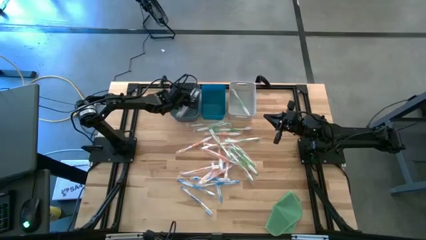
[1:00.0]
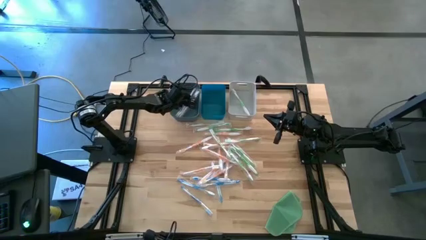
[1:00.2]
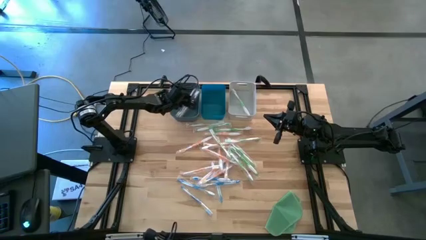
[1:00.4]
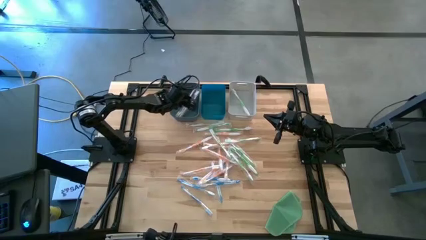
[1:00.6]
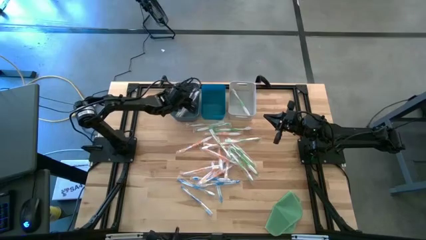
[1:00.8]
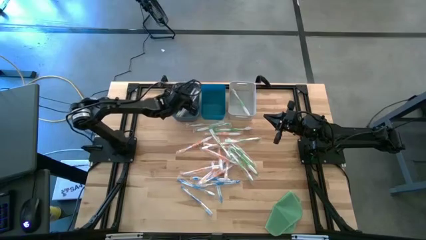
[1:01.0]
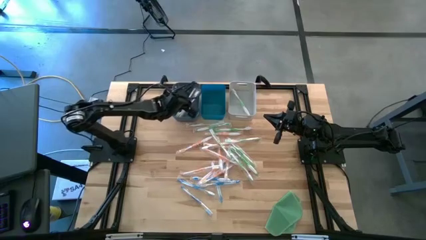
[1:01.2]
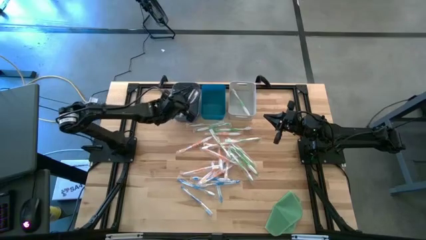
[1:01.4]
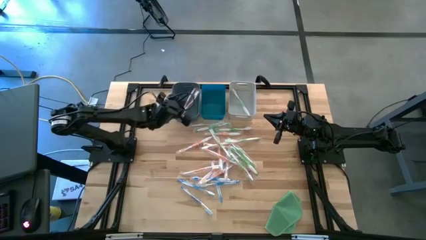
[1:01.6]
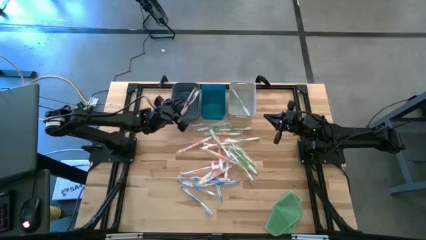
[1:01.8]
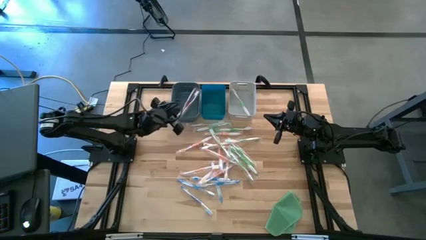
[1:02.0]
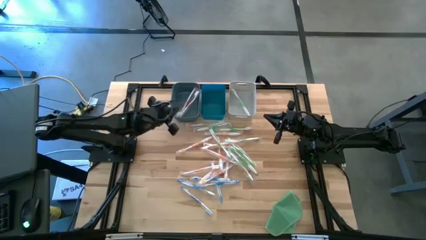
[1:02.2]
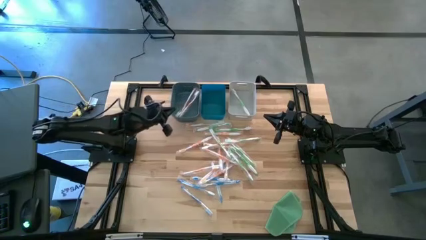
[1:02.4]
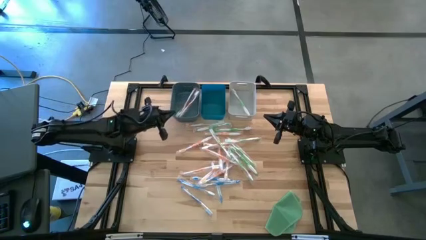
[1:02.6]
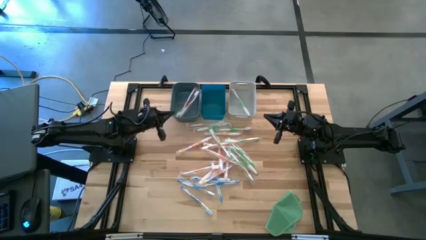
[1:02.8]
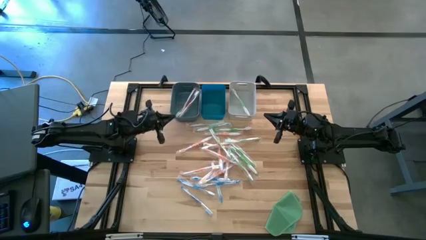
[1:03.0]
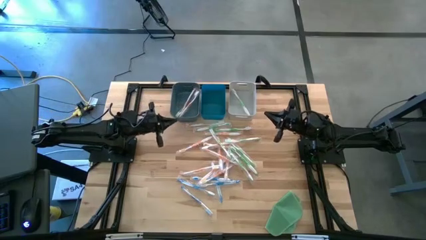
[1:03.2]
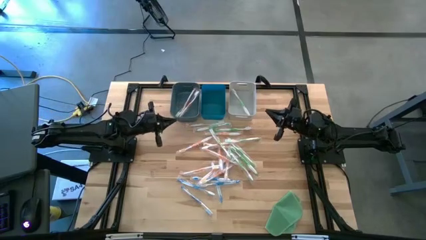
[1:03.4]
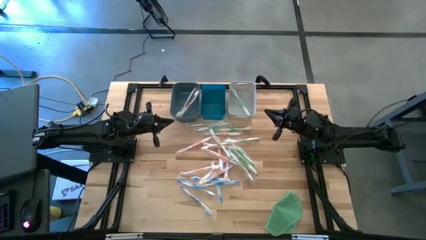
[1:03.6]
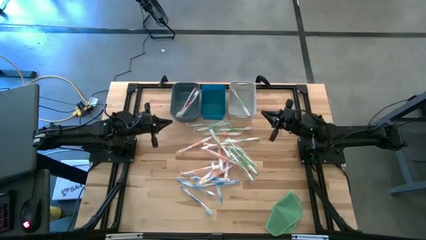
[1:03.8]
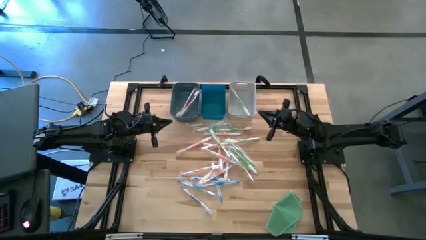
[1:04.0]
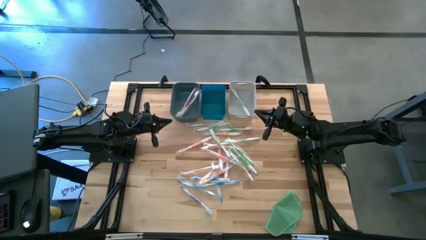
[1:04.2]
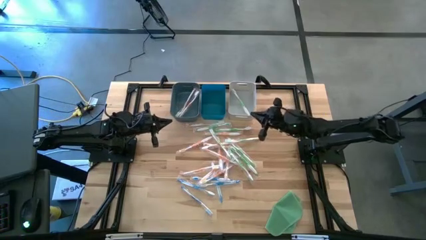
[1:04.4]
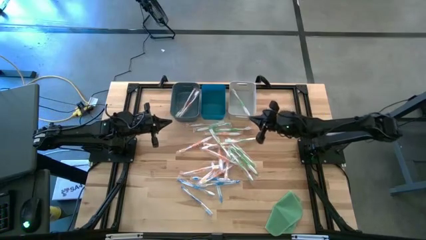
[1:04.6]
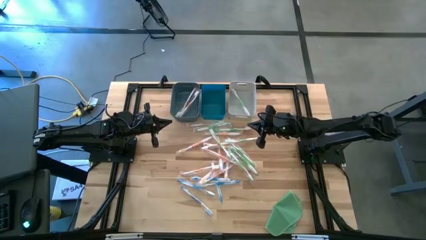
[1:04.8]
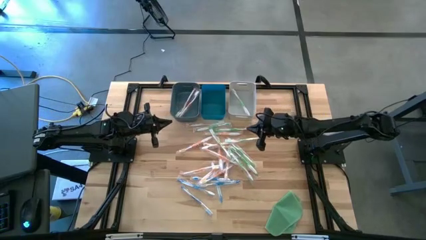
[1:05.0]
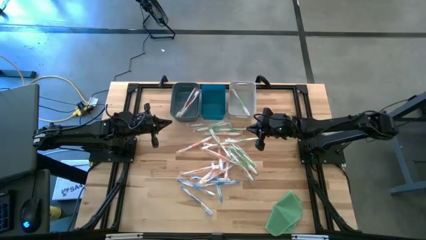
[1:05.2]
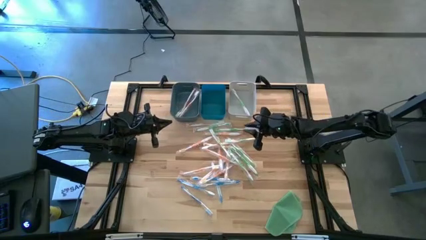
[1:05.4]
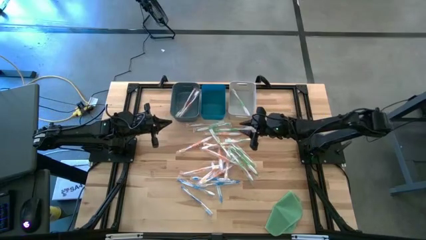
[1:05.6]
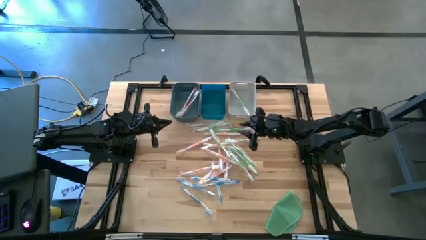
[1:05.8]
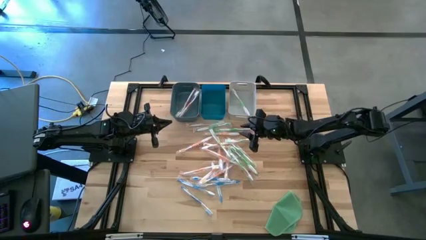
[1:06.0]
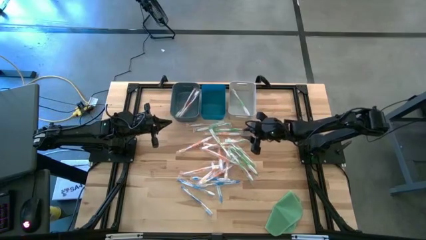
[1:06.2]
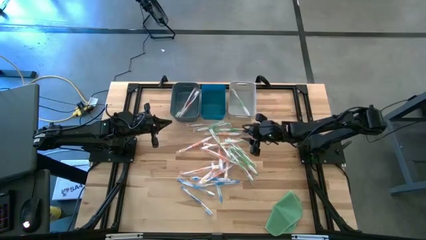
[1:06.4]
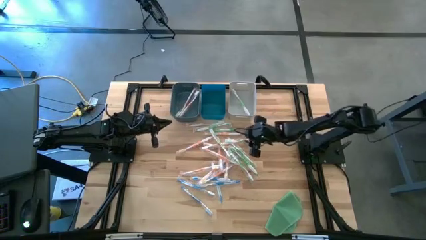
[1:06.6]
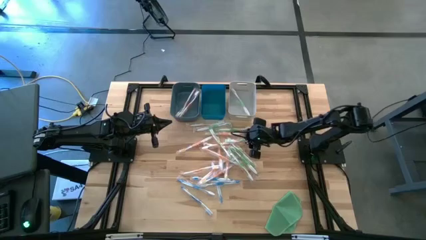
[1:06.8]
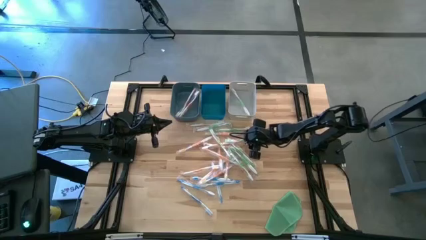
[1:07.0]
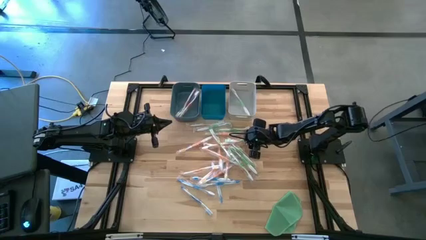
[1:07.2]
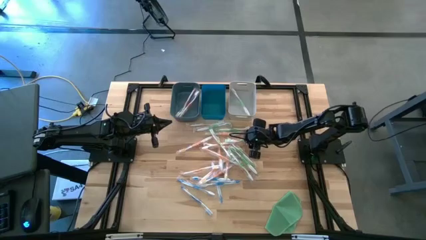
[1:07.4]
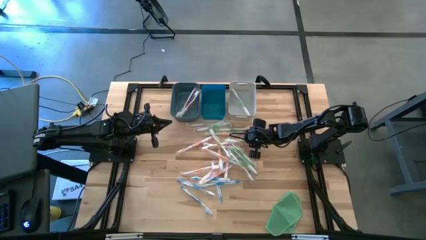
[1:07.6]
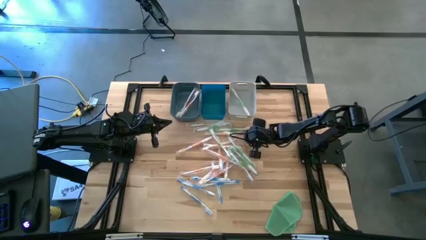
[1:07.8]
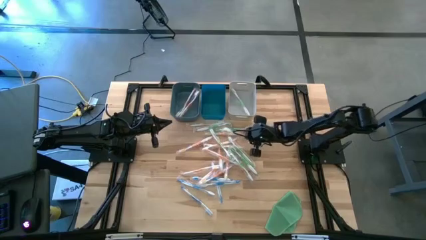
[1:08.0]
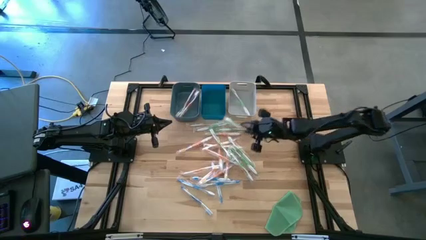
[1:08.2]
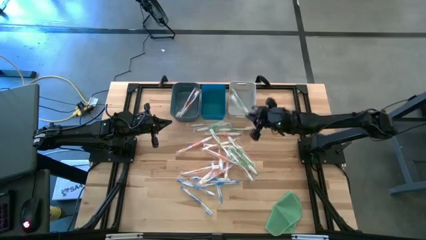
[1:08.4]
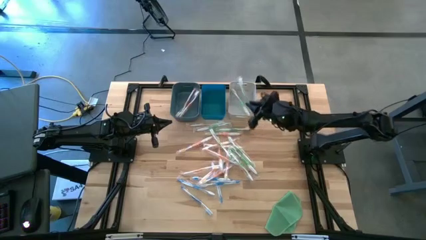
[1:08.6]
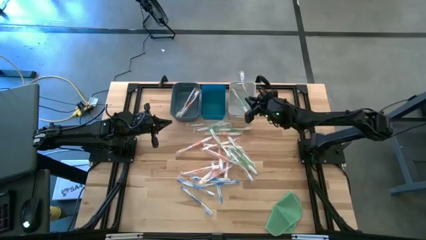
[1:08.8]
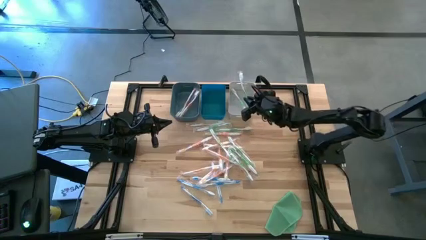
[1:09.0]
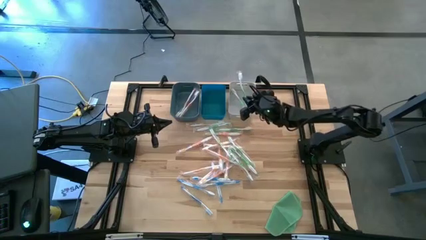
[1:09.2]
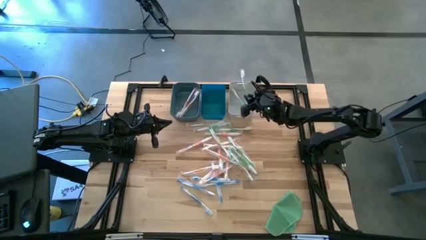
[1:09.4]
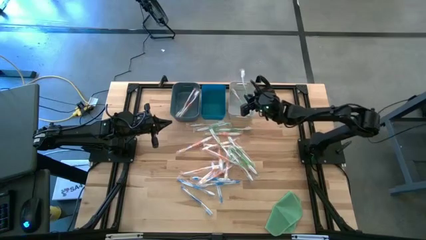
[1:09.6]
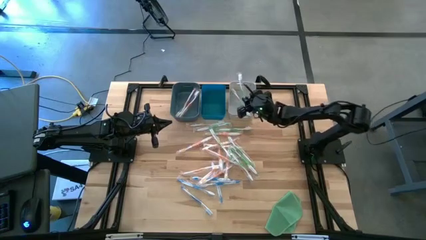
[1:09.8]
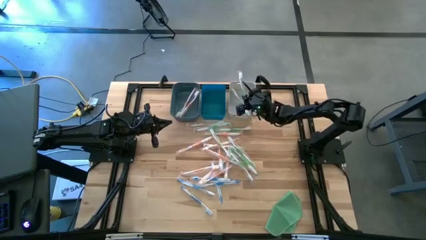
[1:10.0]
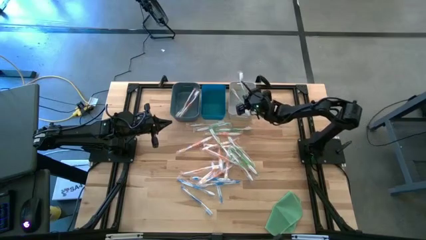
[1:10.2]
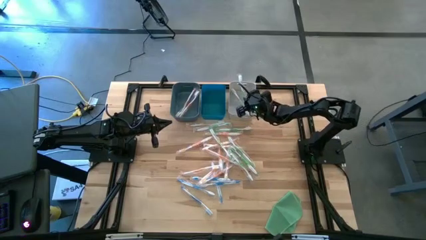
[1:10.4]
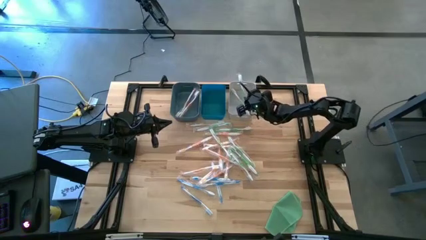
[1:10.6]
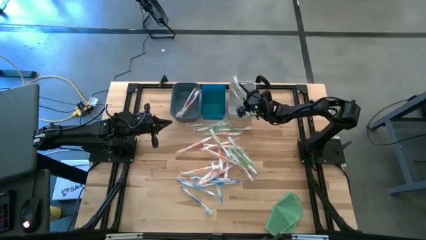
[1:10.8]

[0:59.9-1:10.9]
Task: Pick & Place Toothbrushes
Put the green toothbrush into the white bin

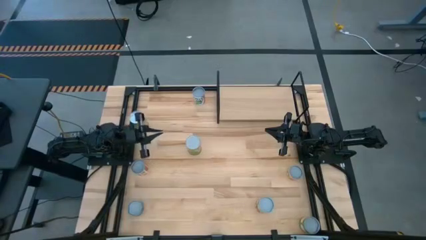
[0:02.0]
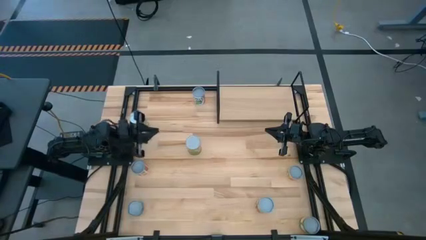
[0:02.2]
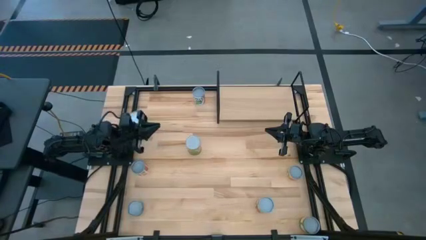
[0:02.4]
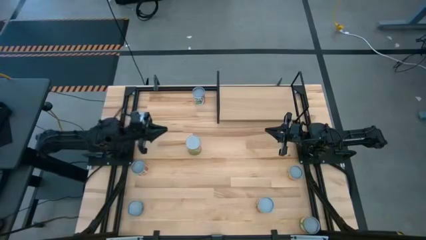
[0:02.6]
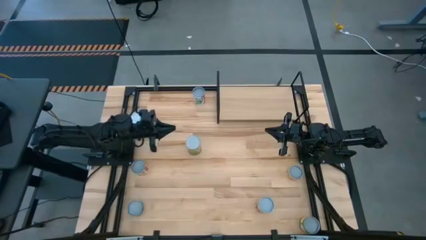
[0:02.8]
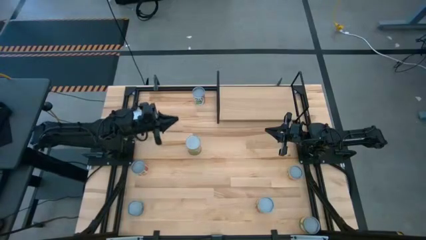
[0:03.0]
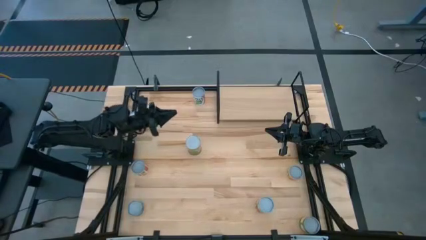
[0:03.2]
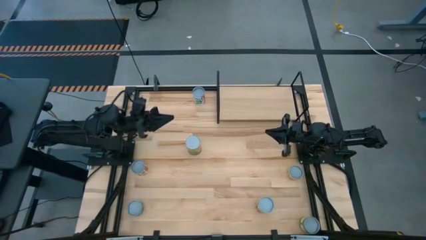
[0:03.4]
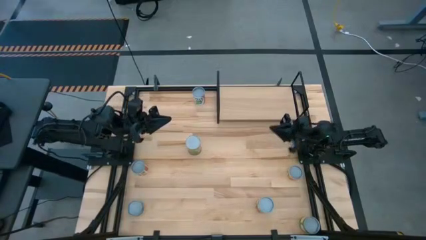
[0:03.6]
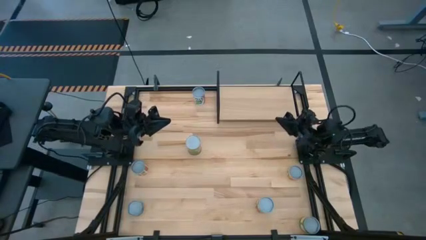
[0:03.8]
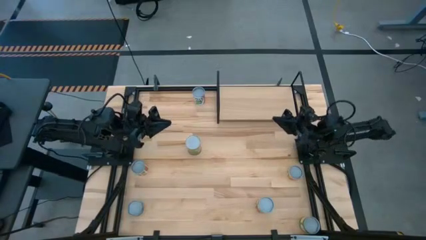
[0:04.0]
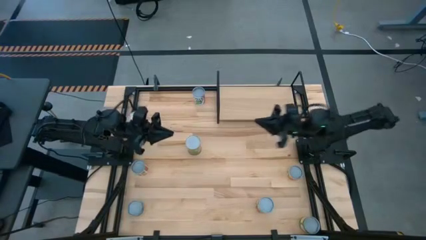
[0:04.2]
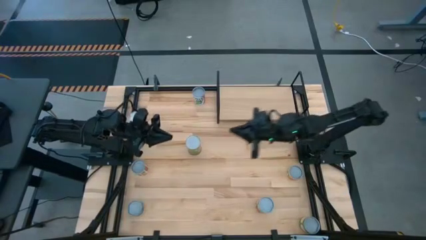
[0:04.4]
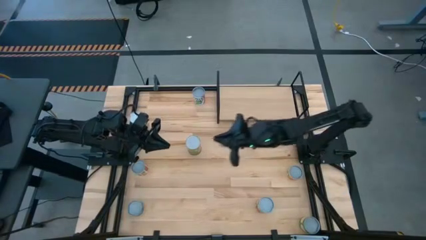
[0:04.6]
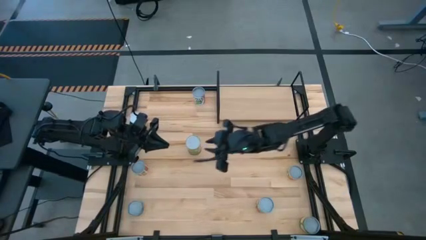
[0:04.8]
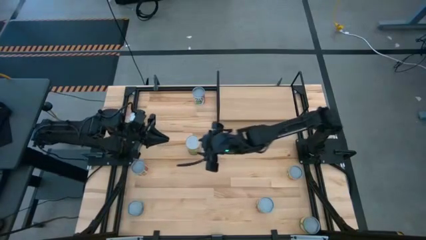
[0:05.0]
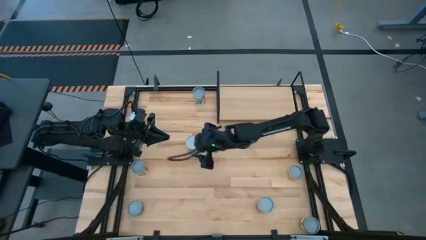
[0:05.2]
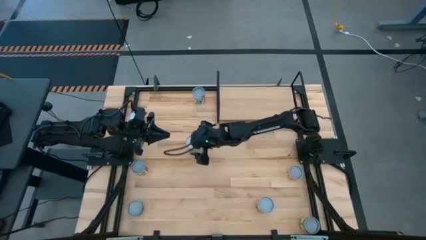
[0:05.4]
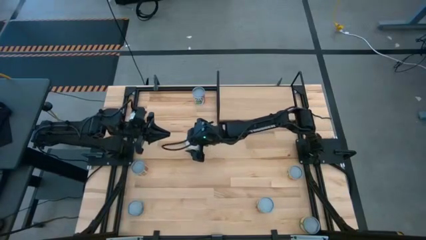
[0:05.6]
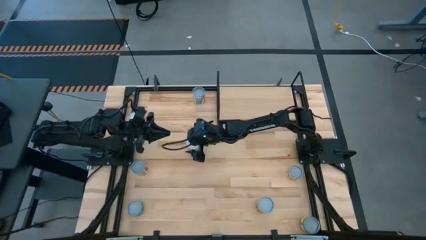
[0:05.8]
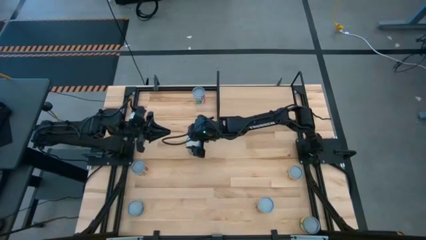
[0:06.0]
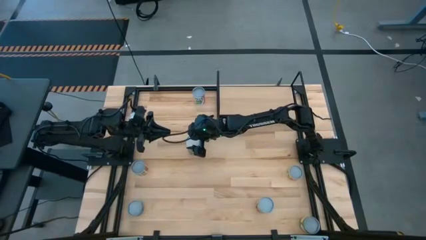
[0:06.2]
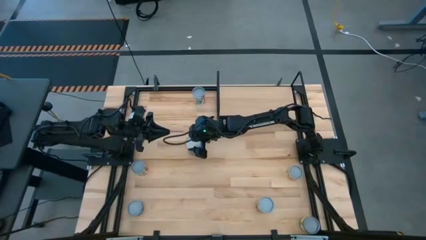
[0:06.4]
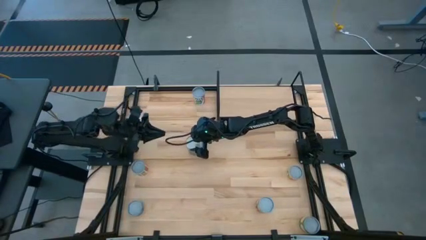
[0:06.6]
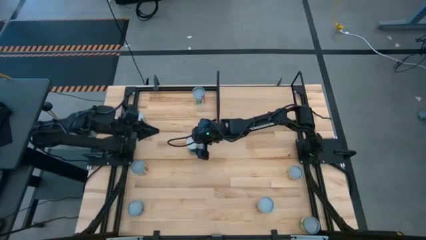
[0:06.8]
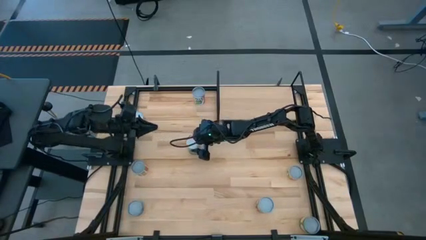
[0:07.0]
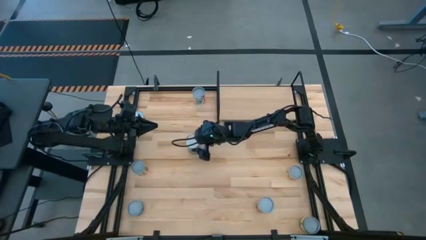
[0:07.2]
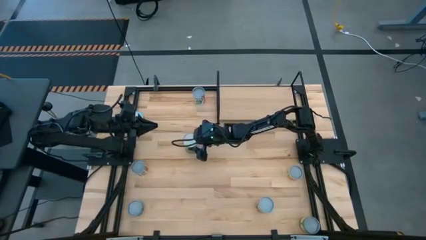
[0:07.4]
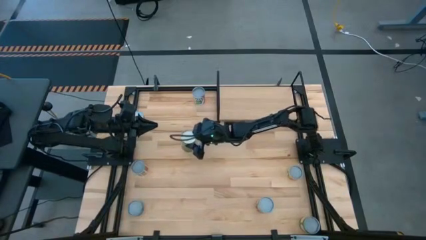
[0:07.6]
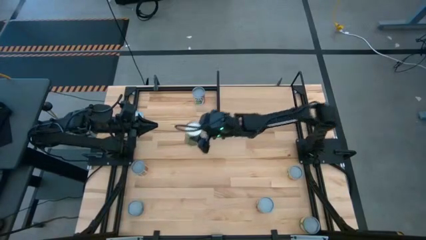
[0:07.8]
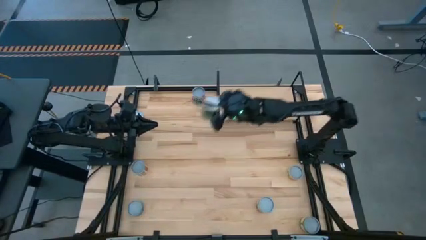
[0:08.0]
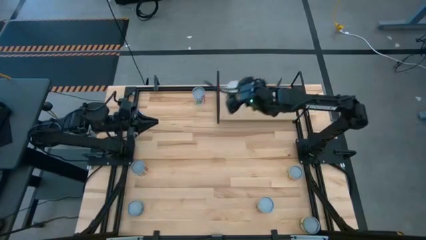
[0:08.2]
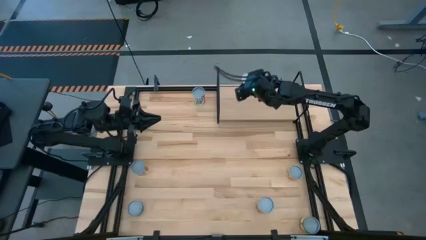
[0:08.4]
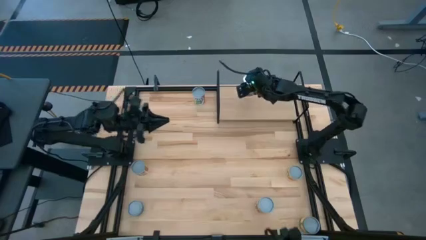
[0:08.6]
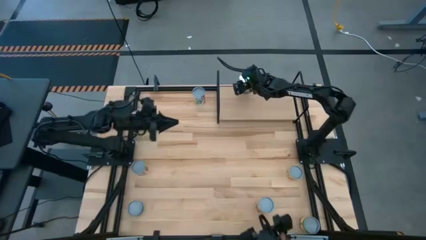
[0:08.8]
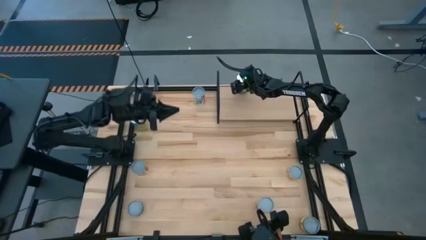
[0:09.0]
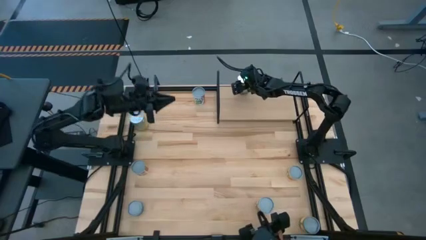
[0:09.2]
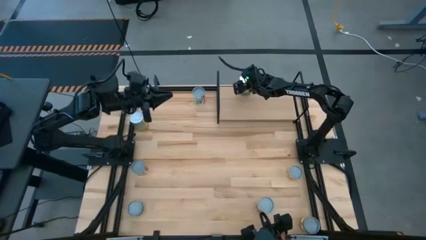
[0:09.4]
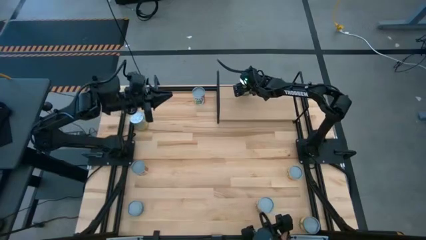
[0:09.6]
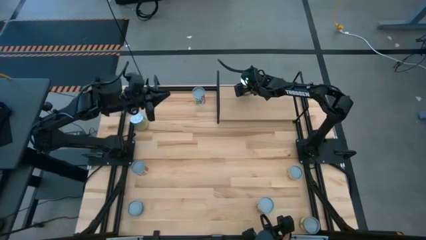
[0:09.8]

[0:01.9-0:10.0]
Task: Pick and place cans onto a shelf
Put the yellow/green can on the shelf
